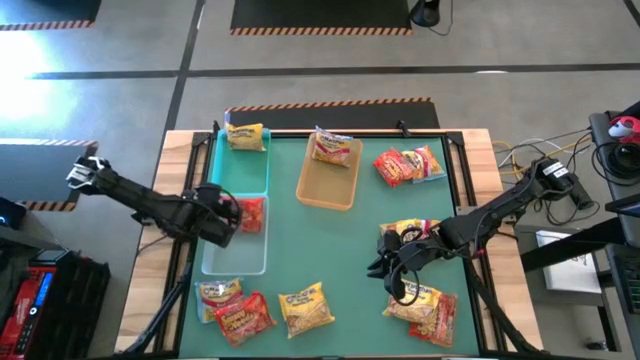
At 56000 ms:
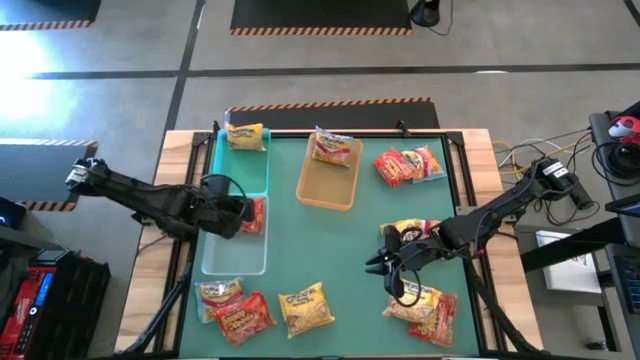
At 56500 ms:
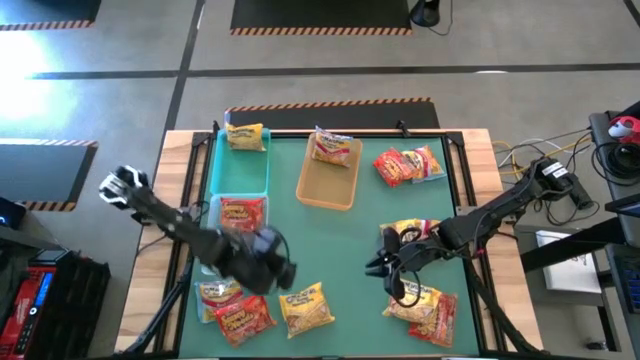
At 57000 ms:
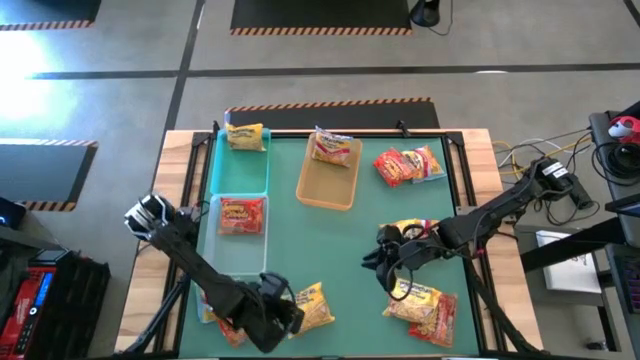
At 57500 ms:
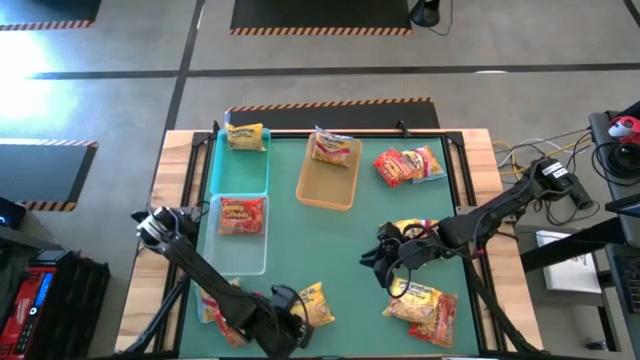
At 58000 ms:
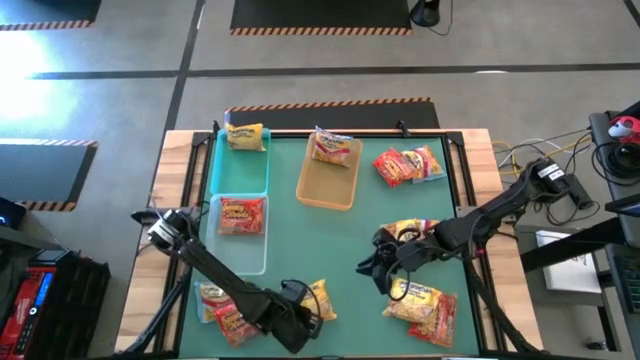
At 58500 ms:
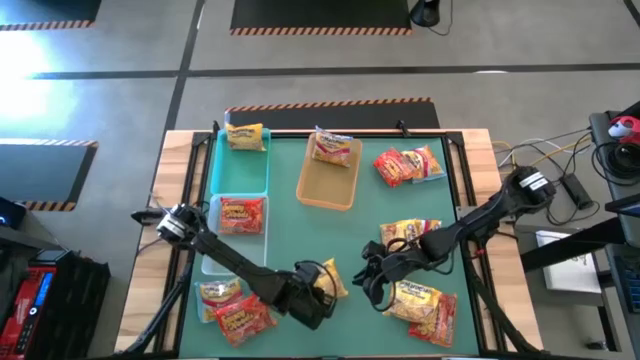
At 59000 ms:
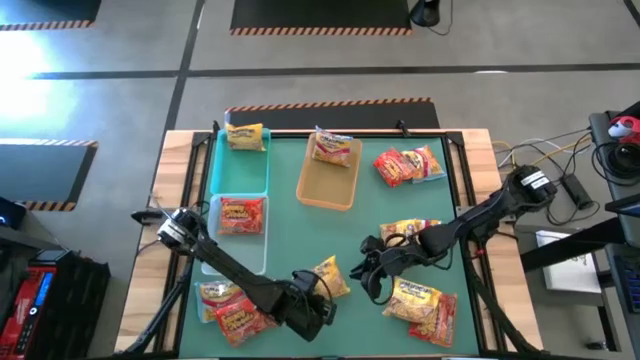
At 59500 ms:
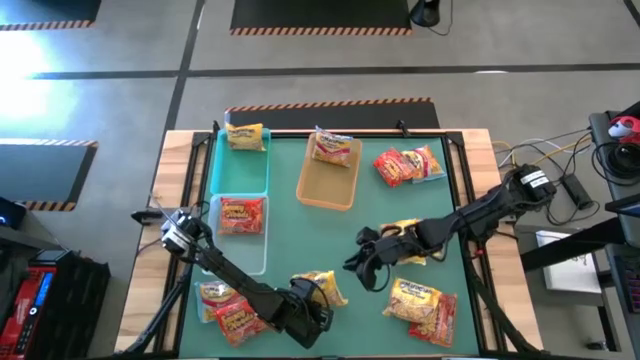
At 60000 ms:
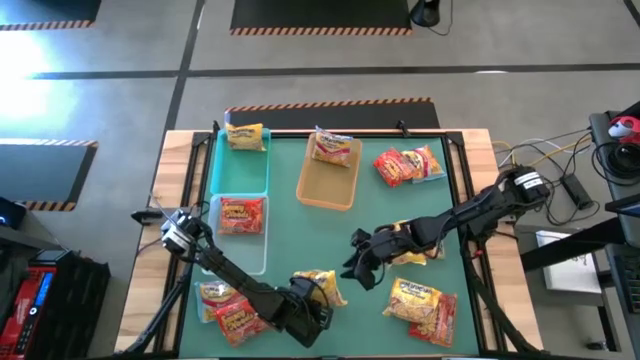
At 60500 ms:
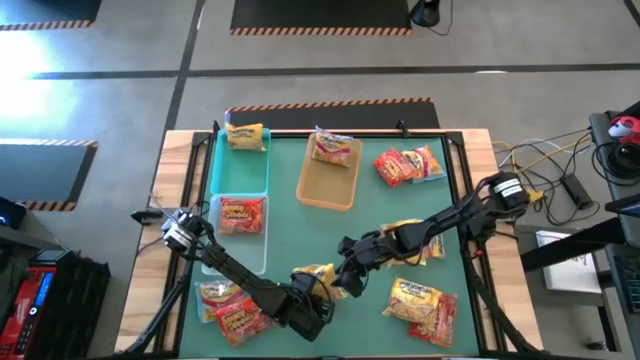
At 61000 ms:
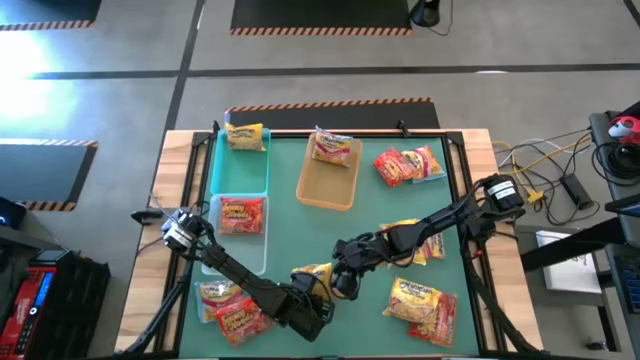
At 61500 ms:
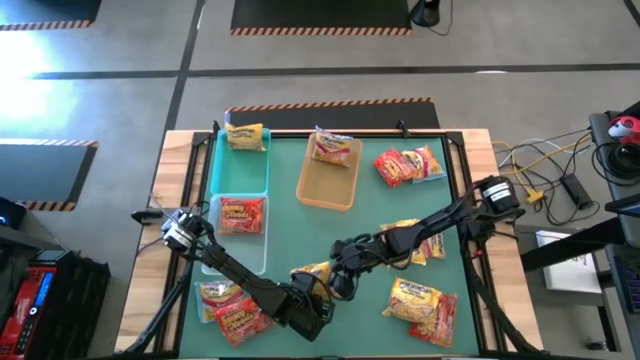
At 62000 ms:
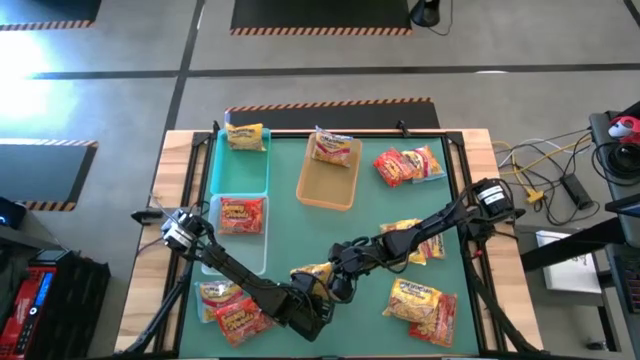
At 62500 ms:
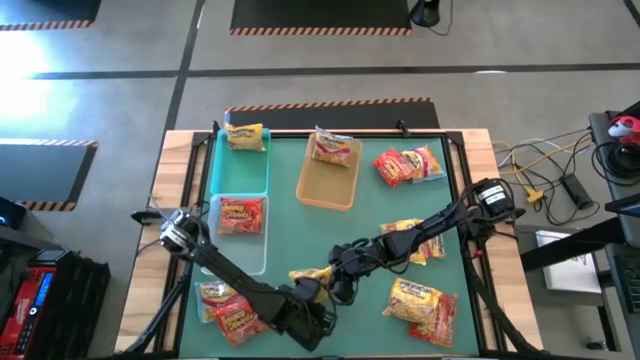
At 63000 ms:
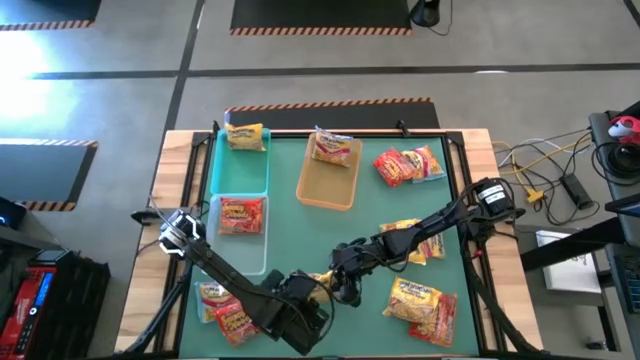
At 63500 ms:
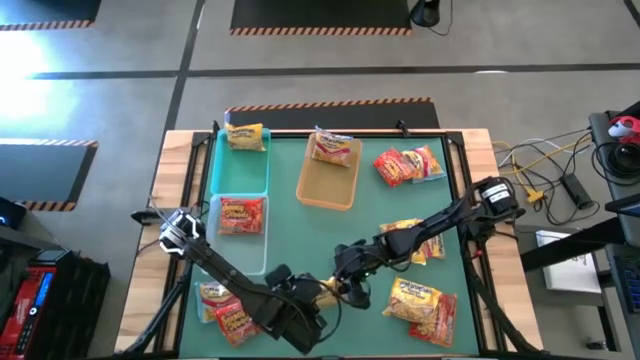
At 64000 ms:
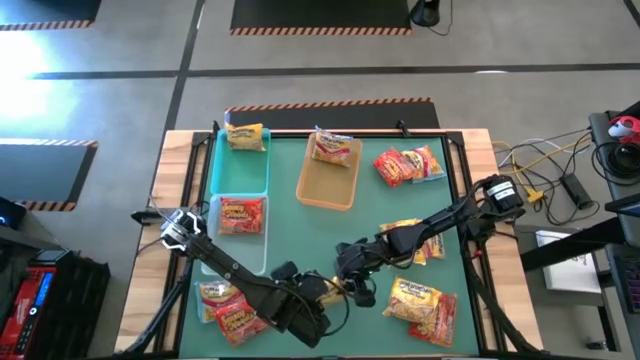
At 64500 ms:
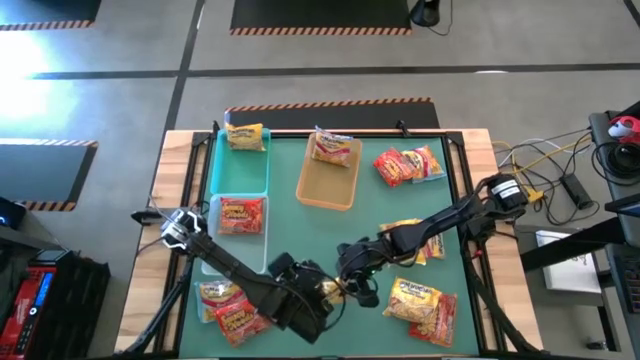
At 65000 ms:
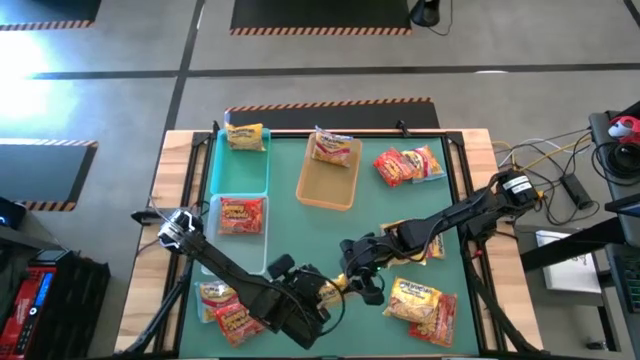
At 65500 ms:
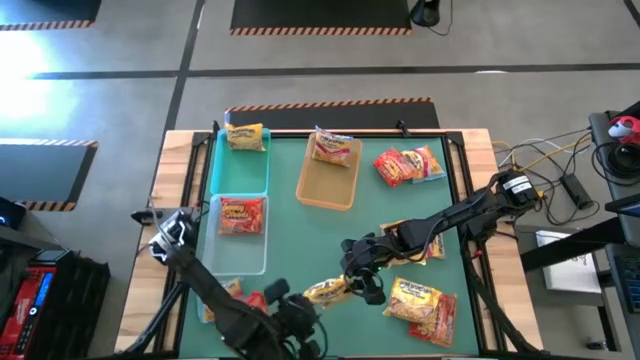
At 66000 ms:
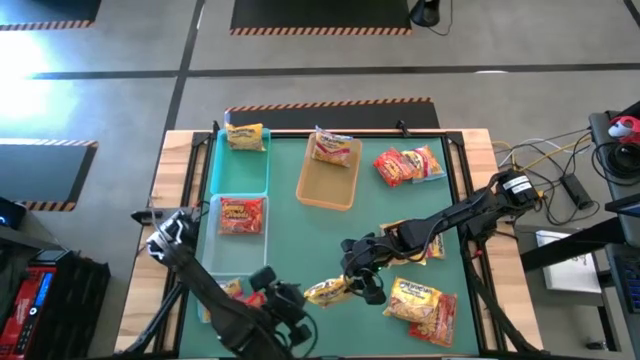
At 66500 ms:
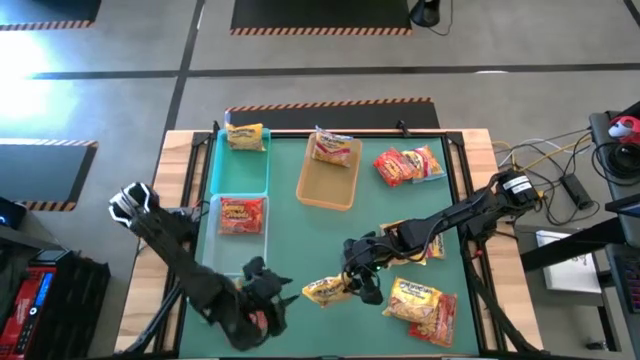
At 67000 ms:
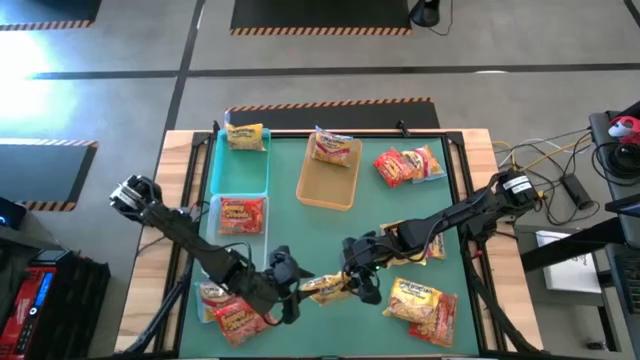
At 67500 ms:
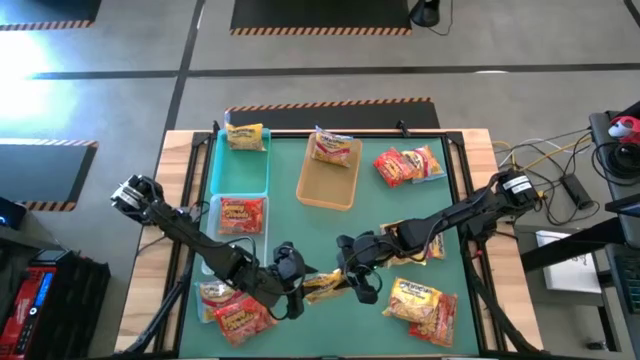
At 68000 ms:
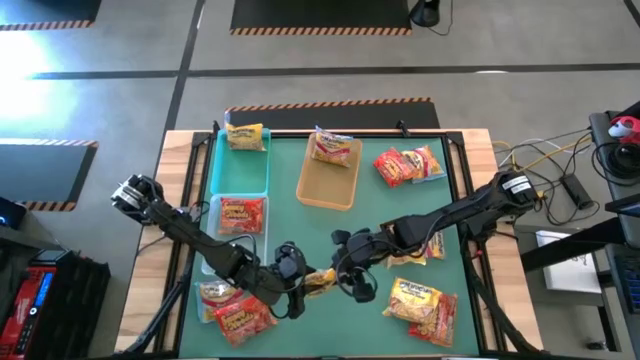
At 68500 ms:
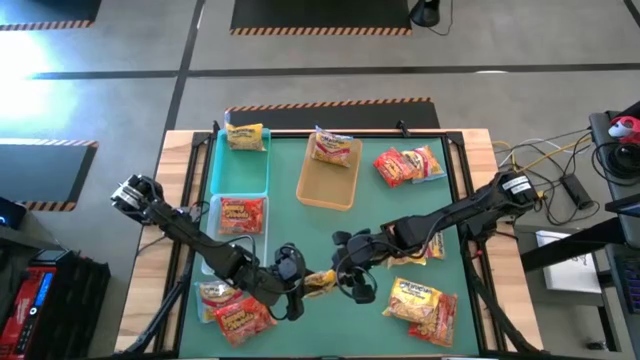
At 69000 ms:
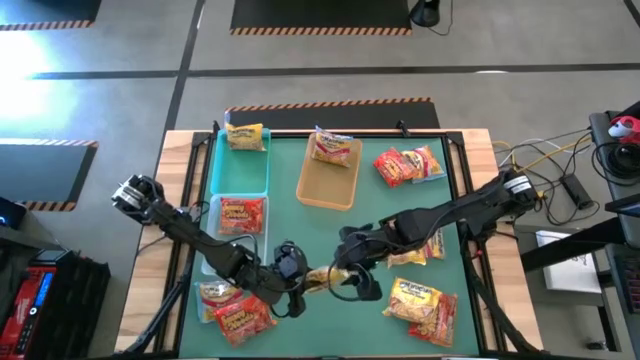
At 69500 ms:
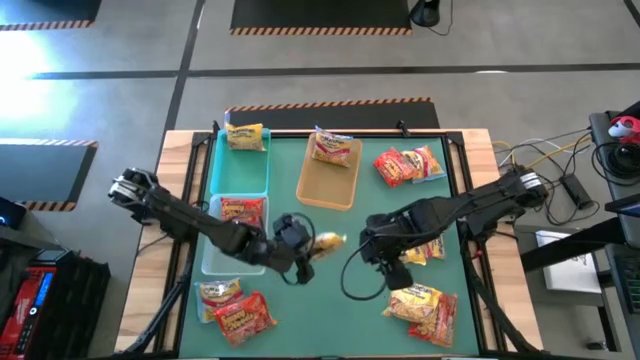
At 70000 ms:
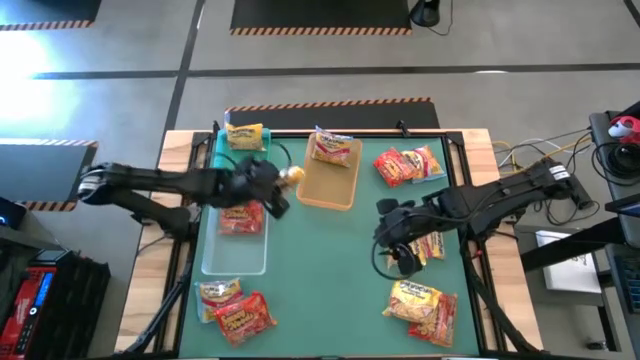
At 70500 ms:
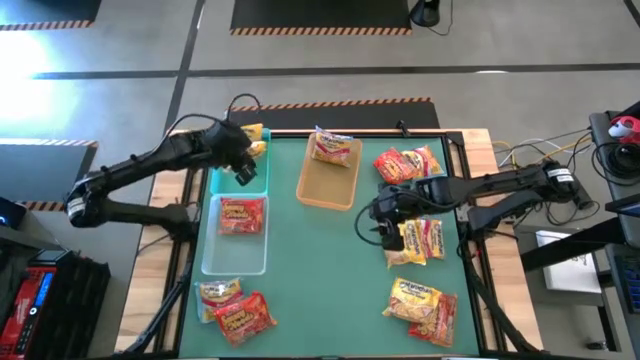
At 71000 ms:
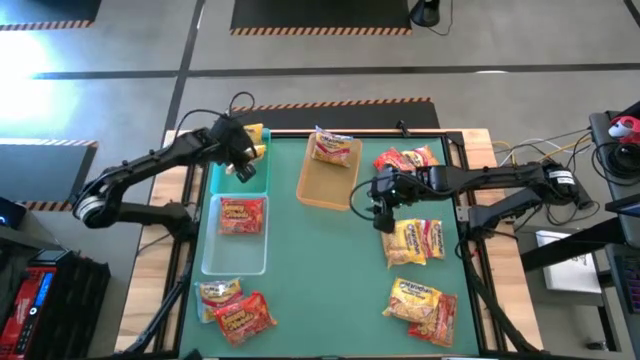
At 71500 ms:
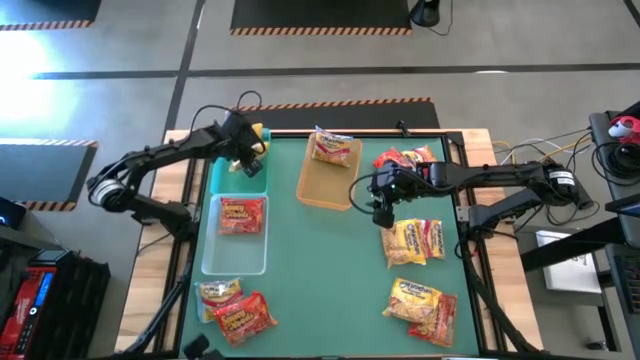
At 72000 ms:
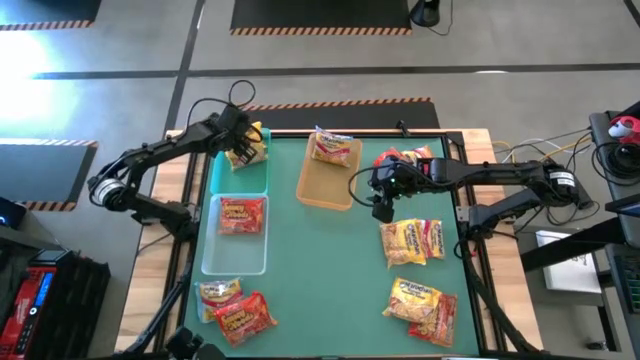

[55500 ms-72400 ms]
Task: Sort Maruchan noodles
Put the yellow noodle pack into the blue bin

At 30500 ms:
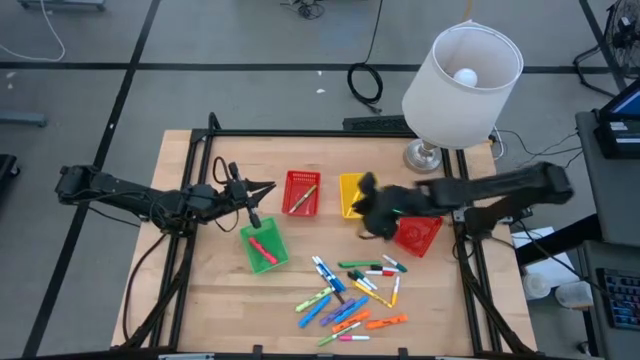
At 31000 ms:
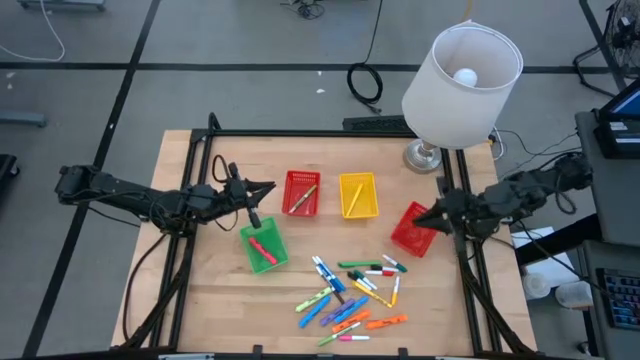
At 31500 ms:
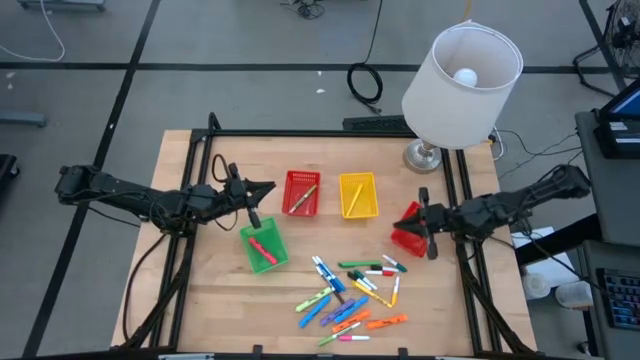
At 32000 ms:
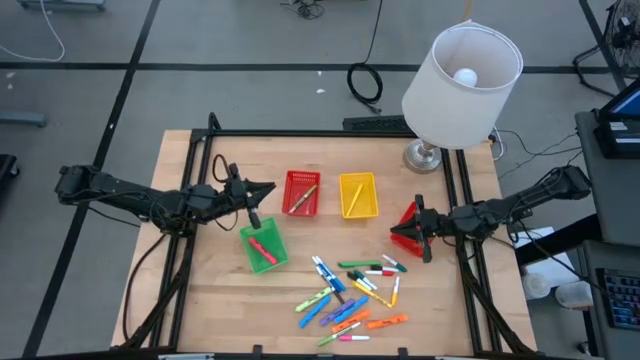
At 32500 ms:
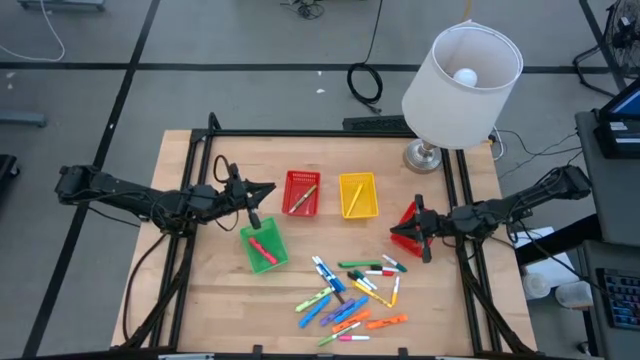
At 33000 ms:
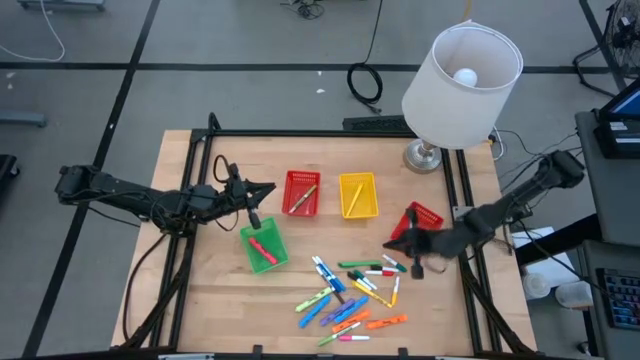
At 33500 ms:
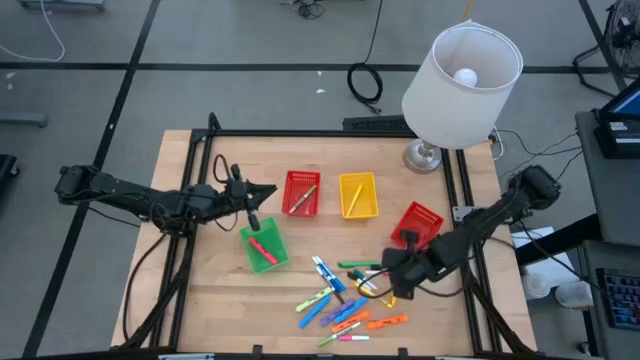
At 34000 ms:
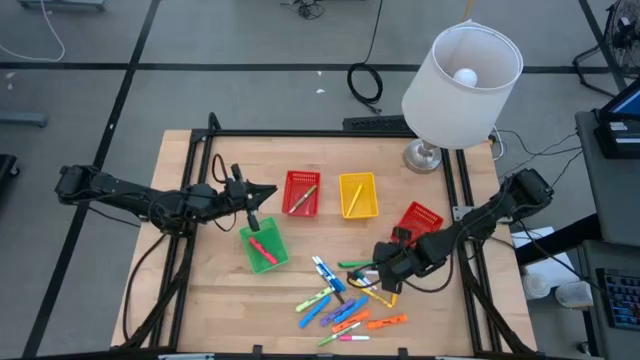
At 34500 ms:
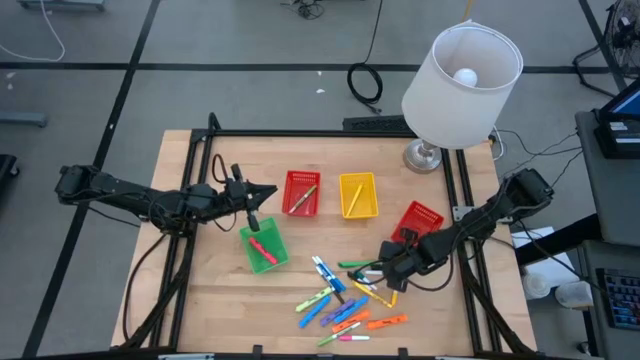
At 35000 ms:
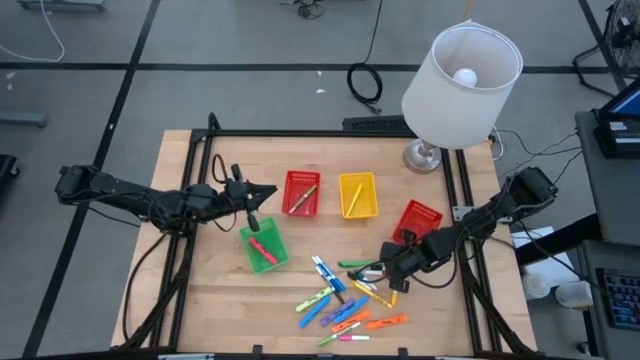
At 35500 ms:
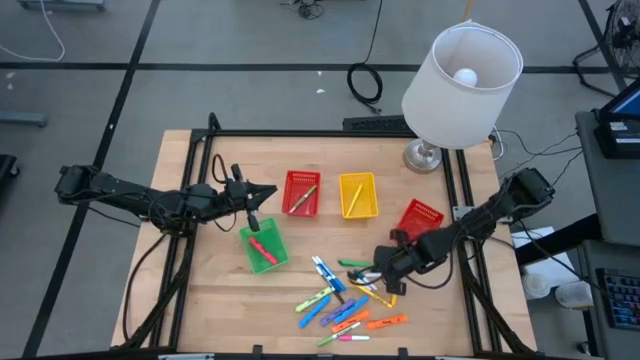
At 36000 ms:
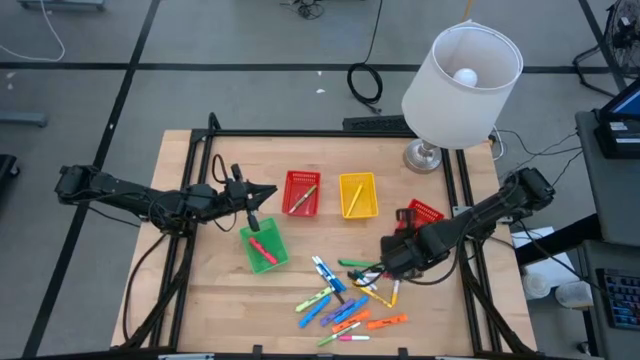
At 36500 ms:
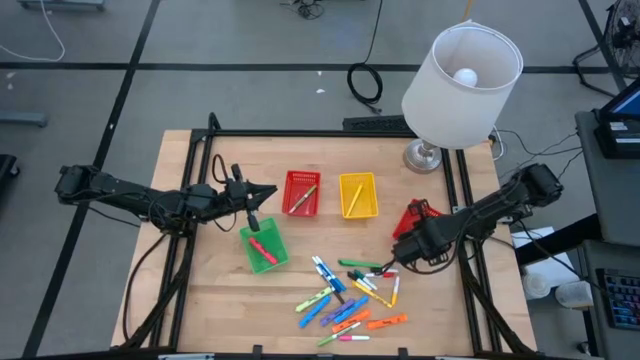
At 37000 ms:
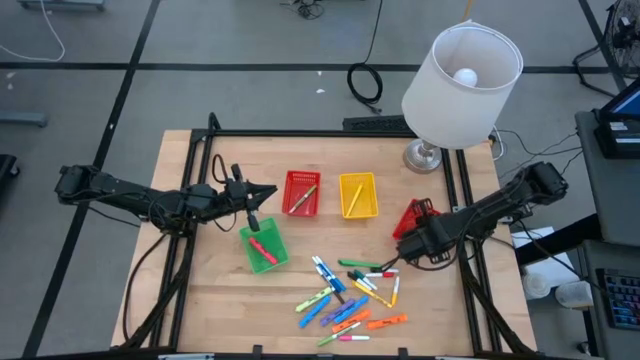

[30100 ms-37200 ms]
Task: Pick & Place Markers
Put the right dark green highlighter into the right red bin
